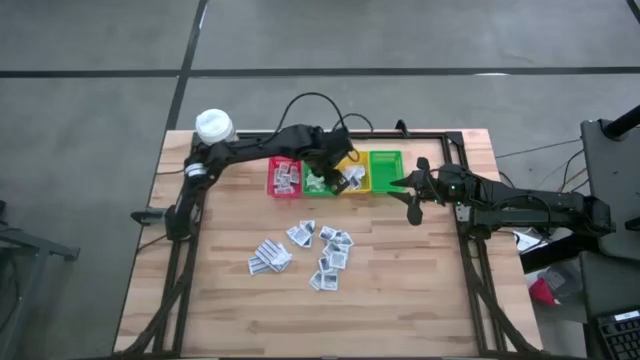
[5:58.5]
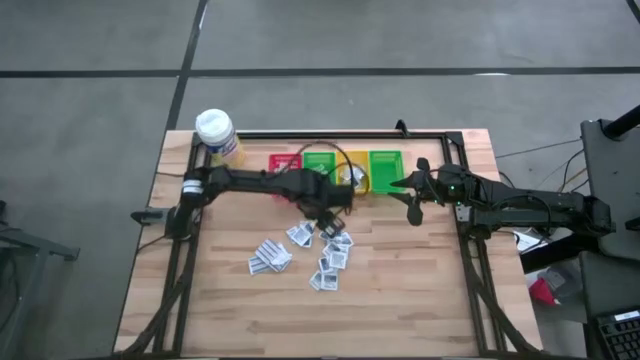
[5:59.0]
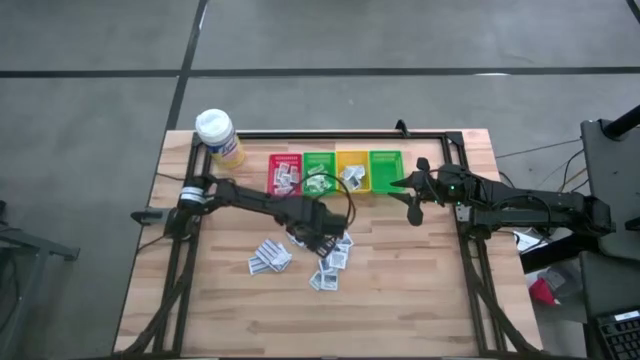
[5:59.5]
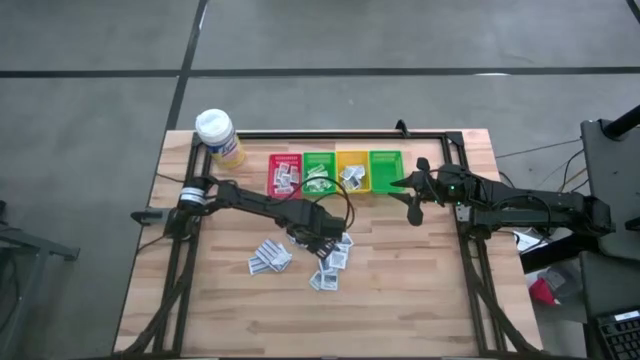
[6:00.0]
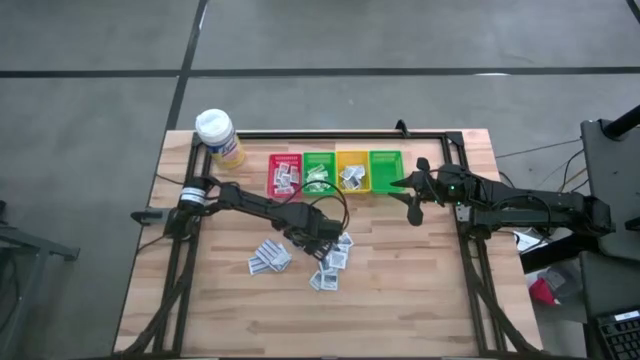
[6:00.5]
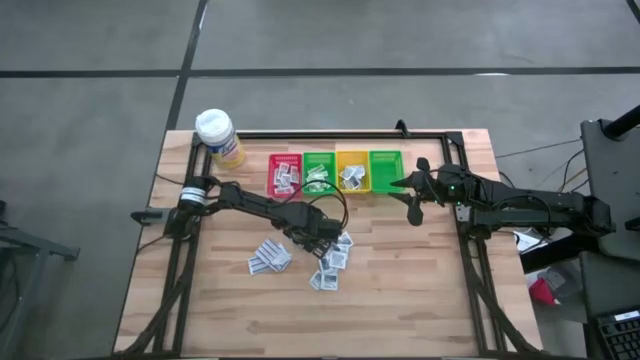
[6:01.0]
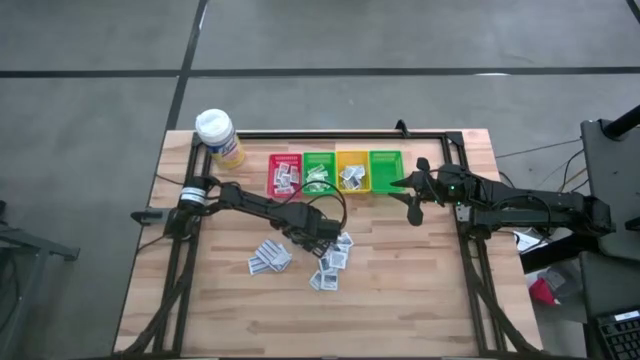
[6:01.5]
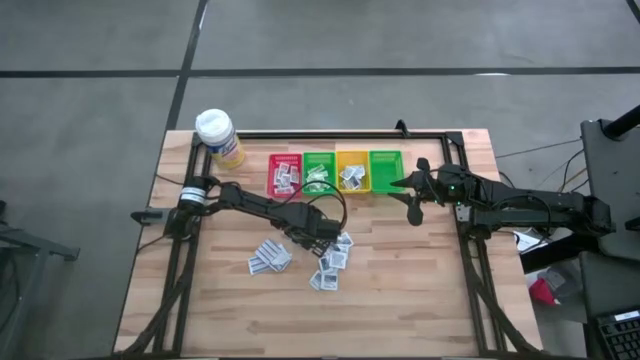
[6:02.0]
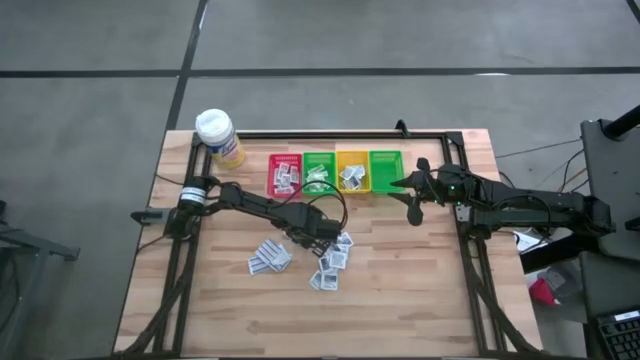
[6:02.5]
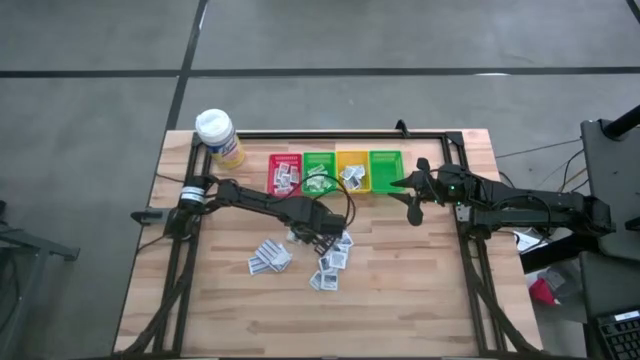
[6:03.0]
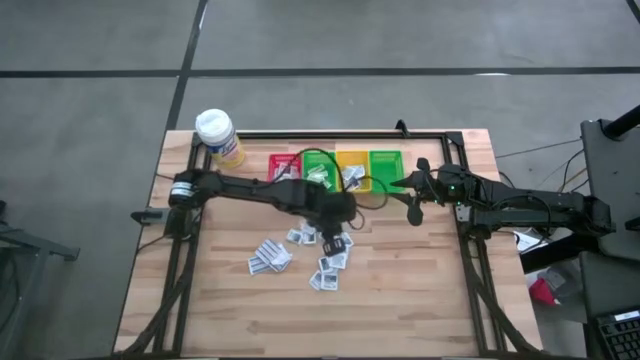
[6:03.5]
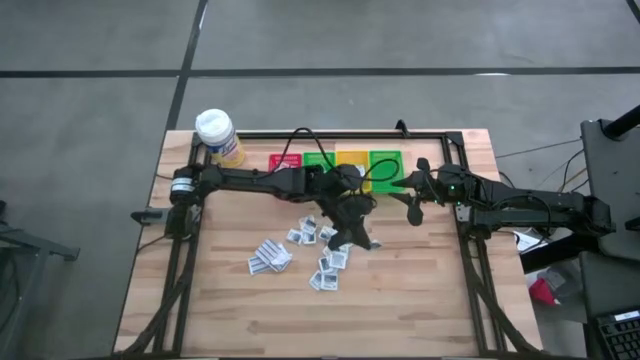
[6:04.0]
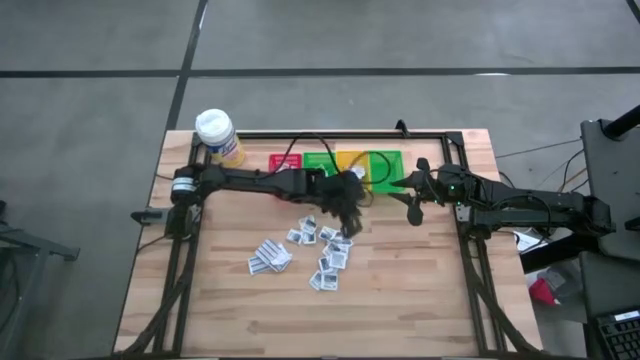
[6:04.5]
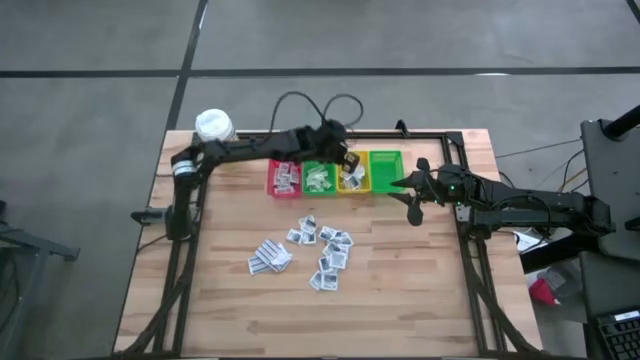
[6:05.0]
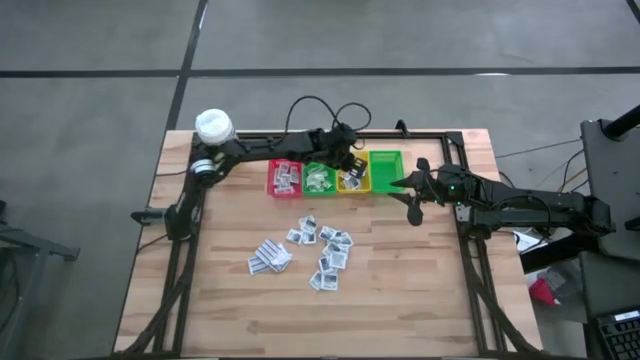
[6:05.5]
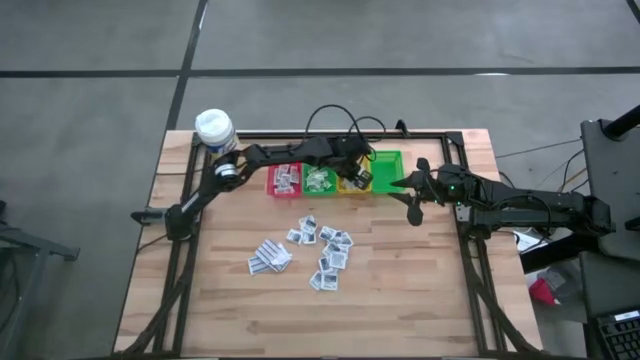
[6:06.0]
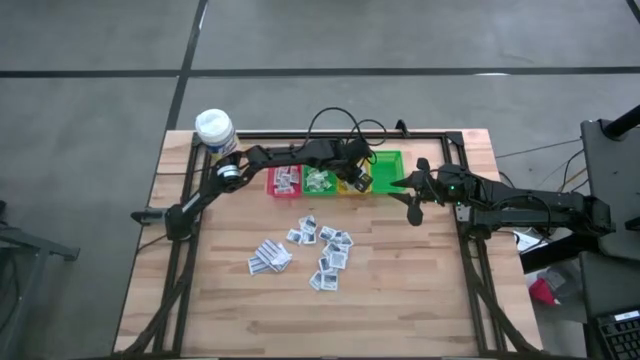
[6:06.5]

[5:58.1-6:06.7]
Task: Pick & Place First Aid Supplies
Put the alcohol pad into the yellow bin

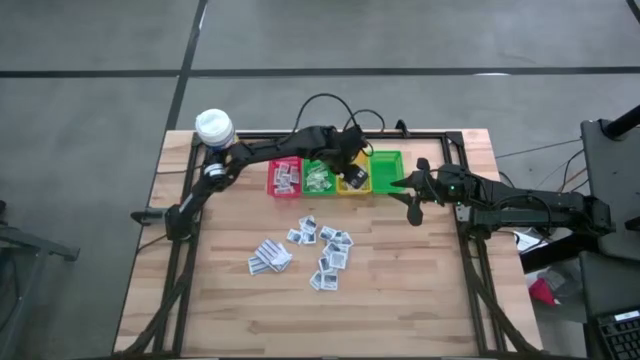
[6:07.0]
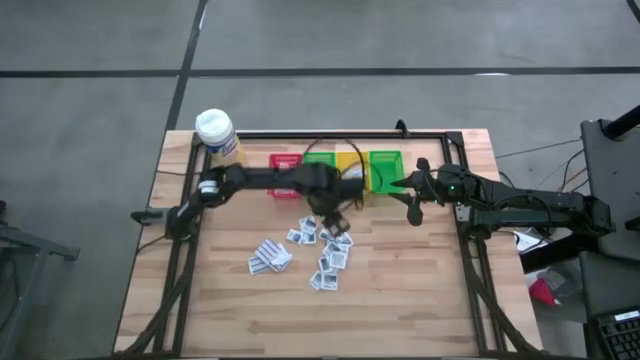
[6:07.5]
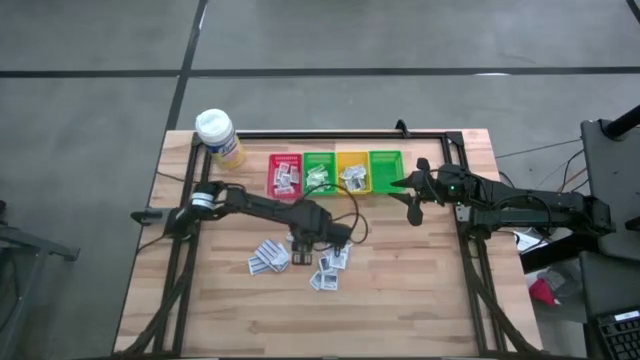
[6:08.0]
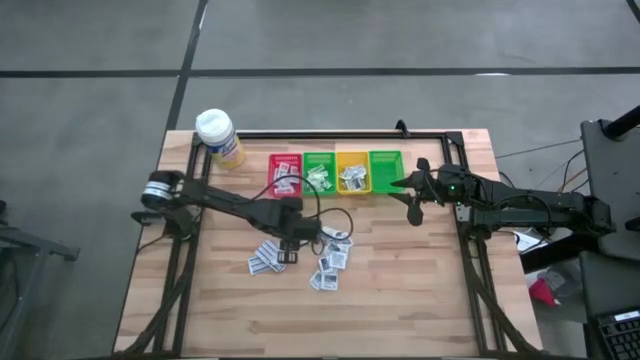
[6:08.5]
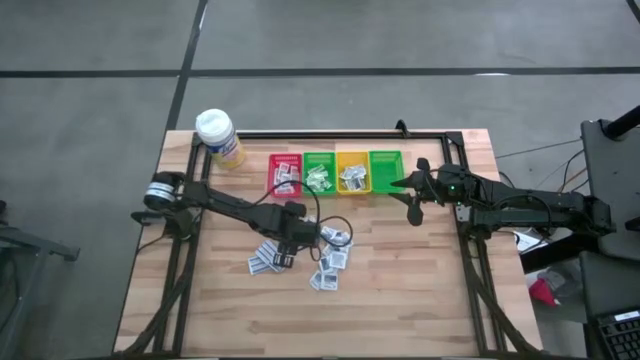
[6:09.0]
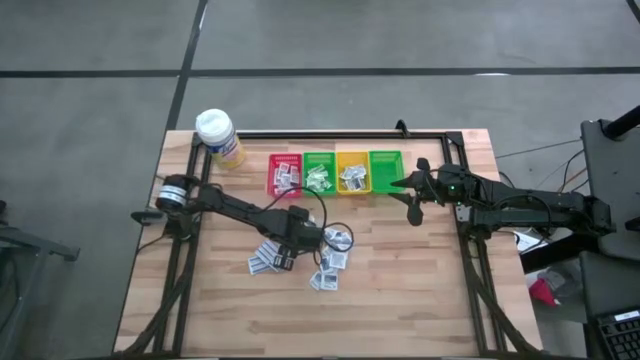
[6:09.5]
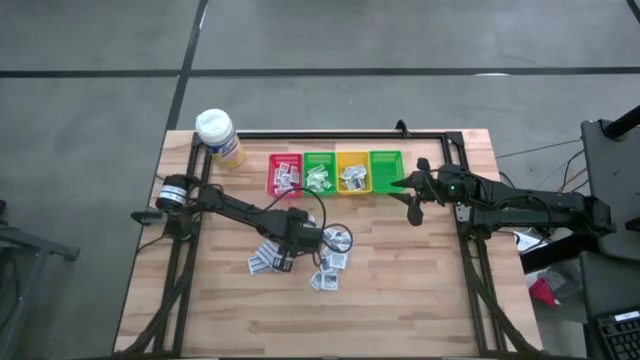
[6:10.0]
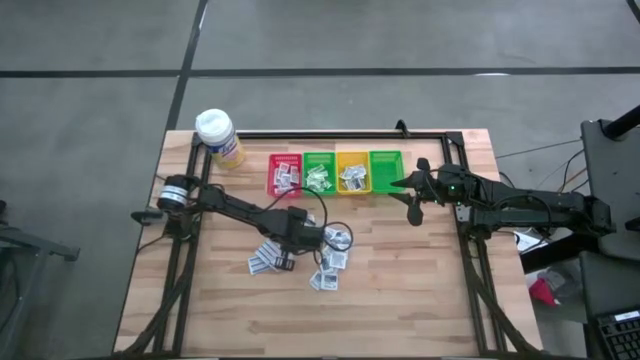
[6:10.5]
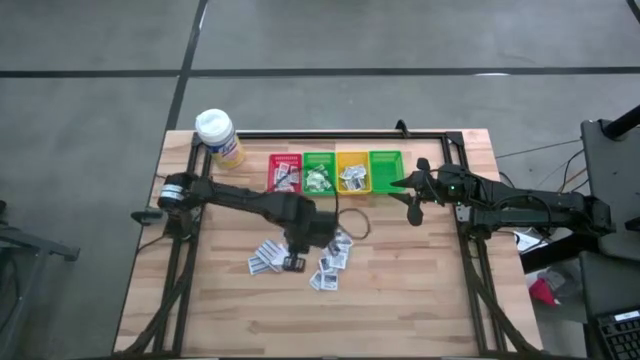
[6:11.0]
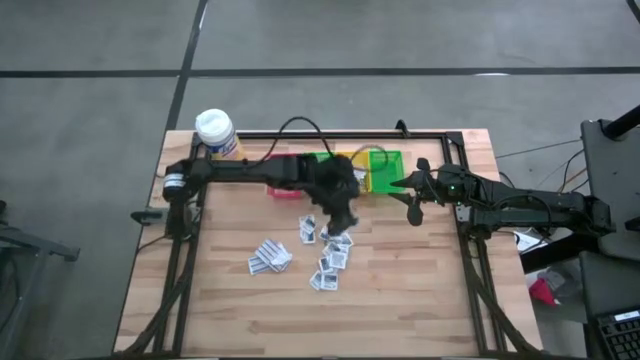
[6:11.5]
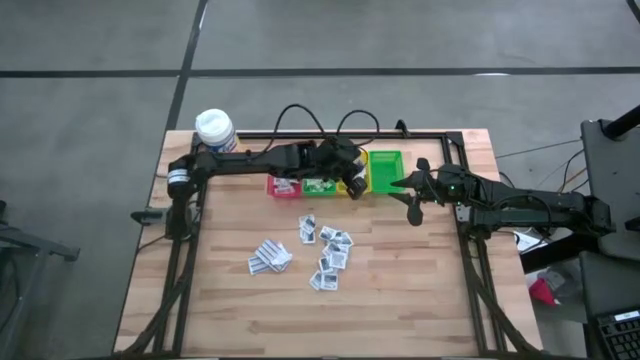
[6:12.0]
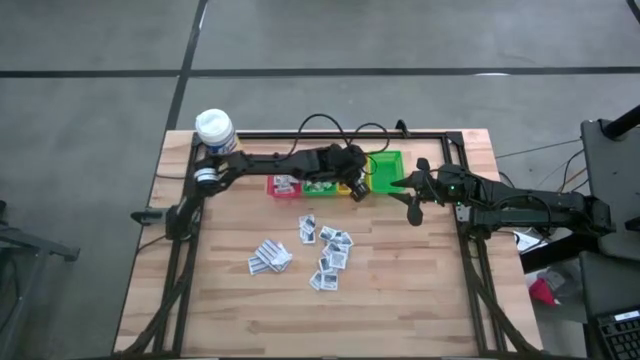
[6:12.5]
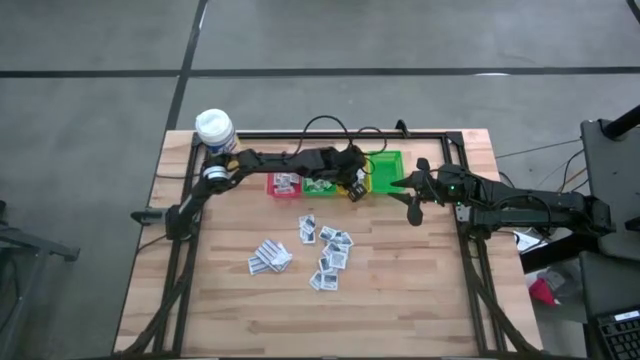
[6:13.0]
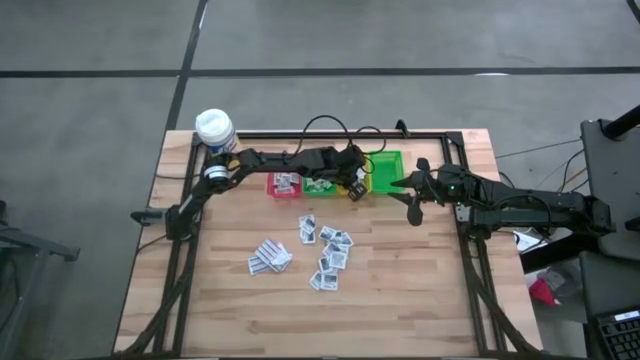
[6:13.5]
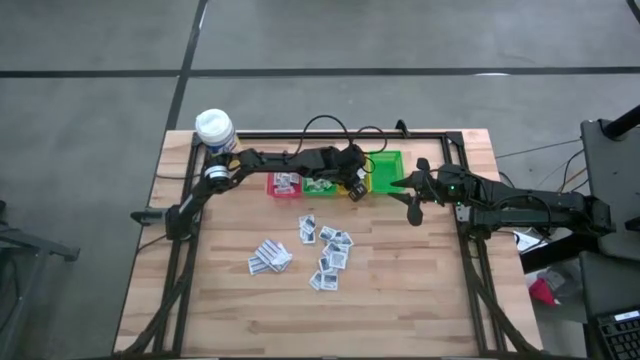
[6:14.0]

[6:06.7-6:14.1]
Put the alcohol pad into the yellow bin

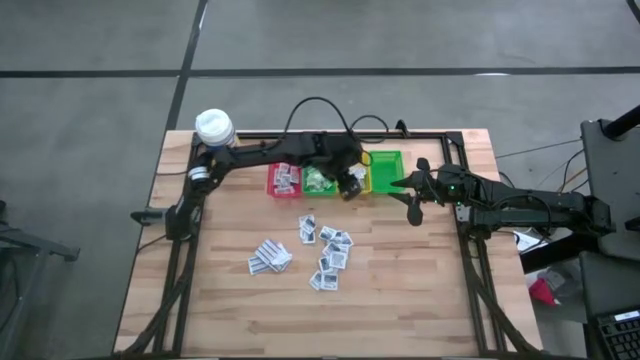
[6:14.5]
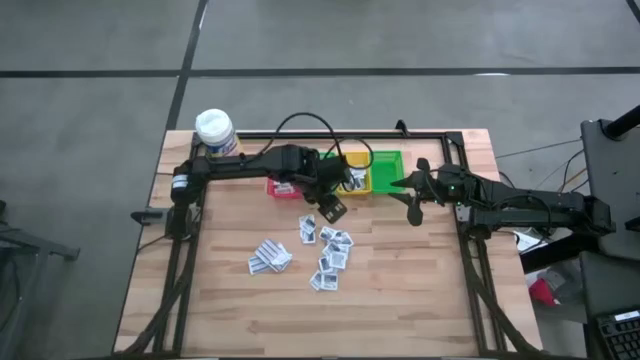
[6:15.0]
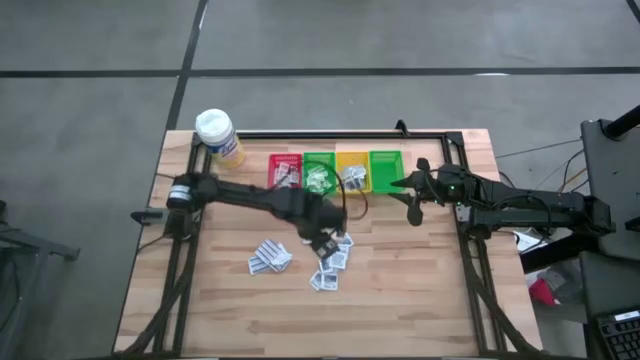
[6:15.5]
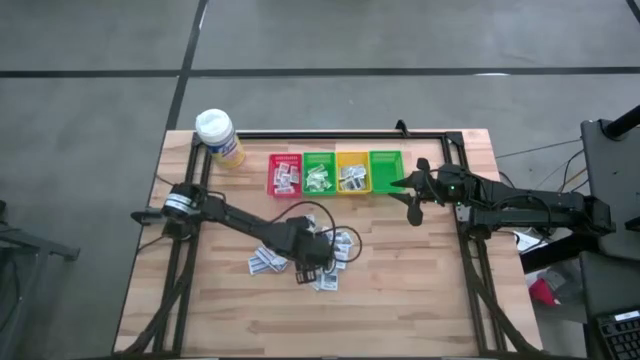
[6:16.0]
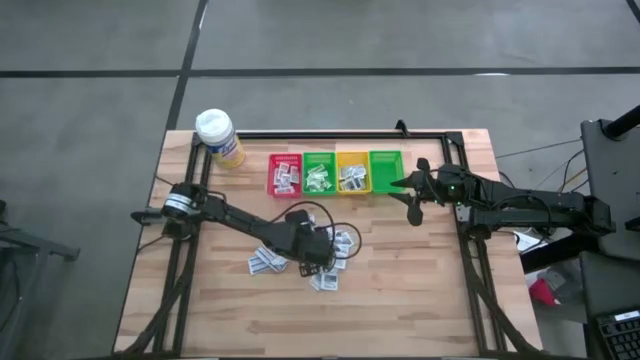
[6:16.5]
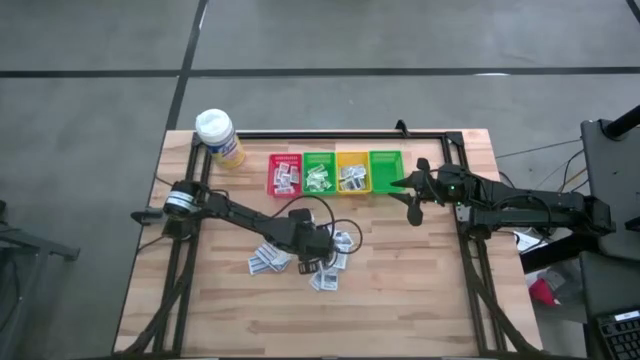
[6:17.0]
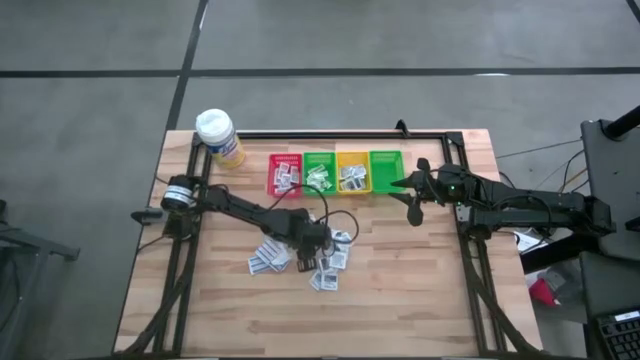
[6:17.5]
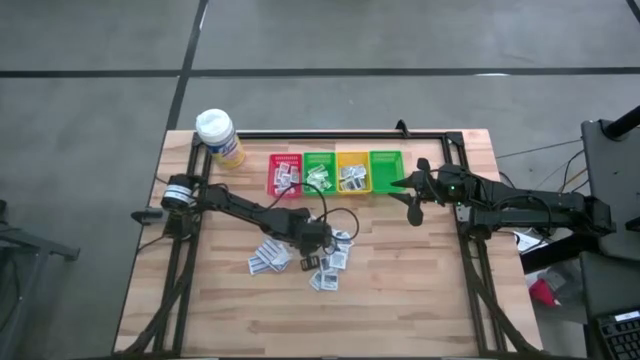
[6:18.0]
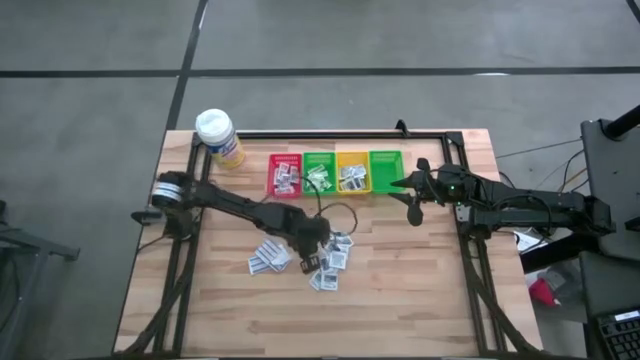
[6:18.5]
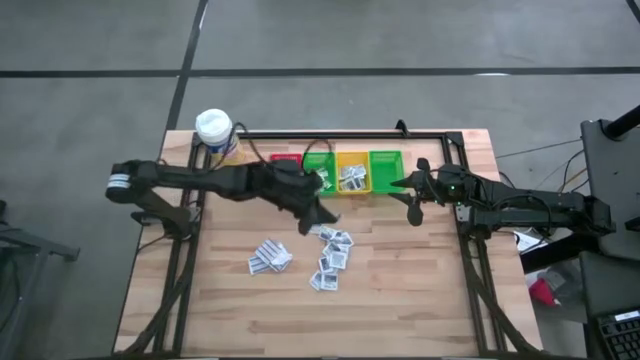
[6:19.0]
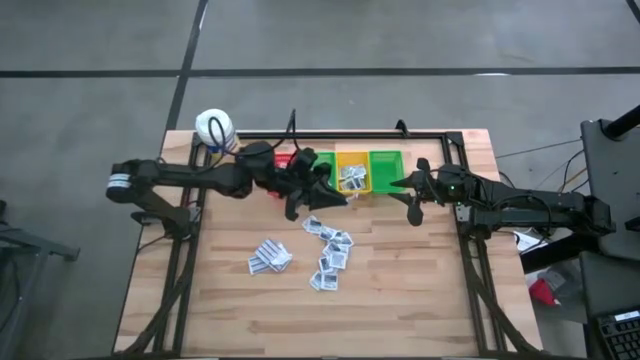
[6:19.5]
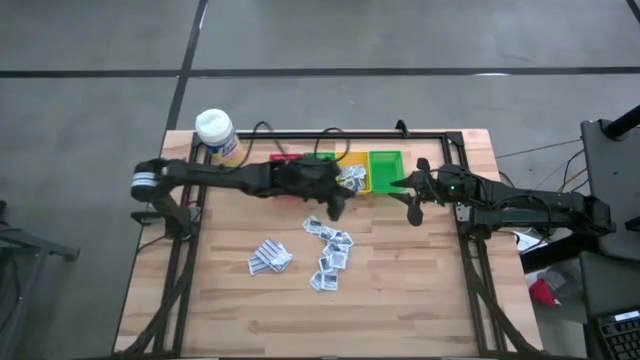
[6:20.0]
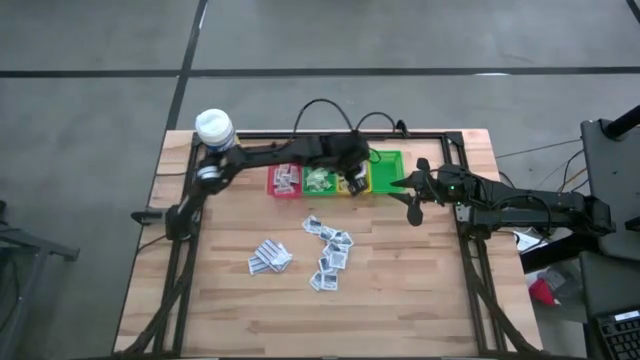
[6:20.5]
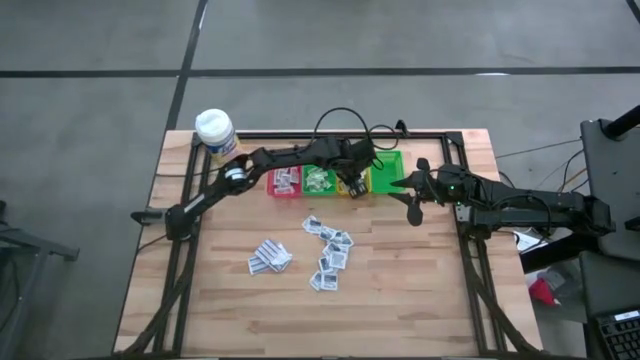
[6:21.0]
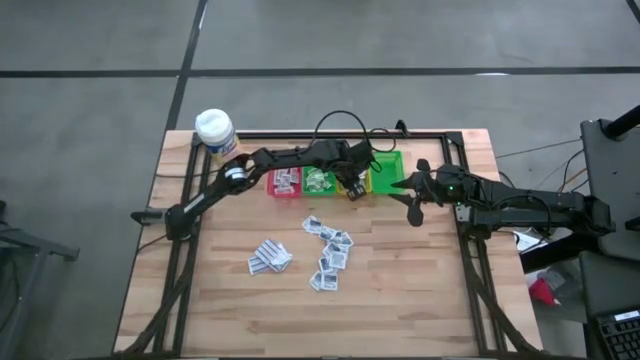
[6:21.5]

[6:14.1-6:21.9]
Put the alcohol pad into the yellow bin
